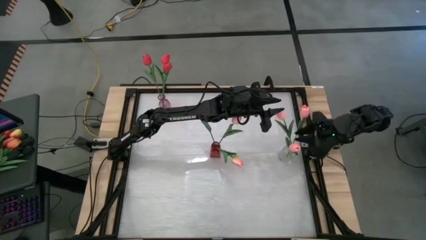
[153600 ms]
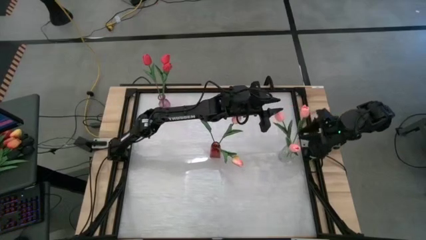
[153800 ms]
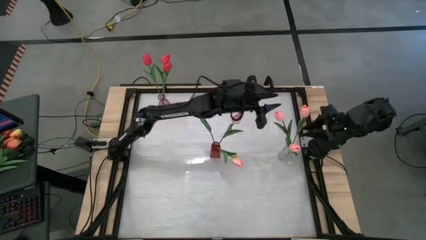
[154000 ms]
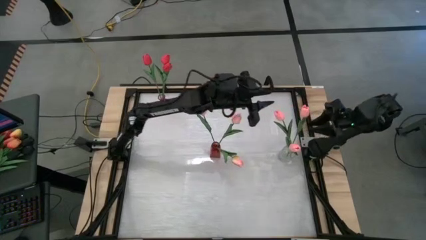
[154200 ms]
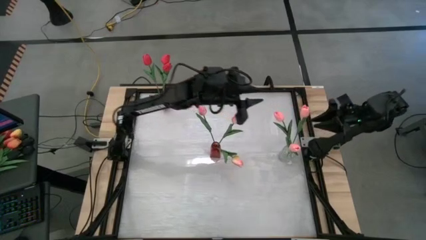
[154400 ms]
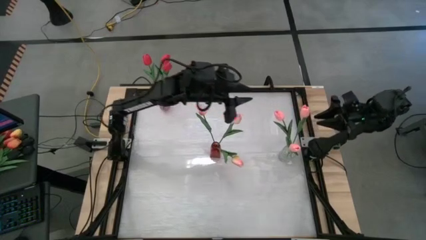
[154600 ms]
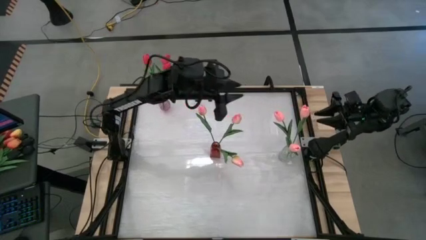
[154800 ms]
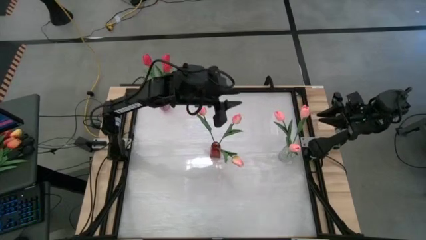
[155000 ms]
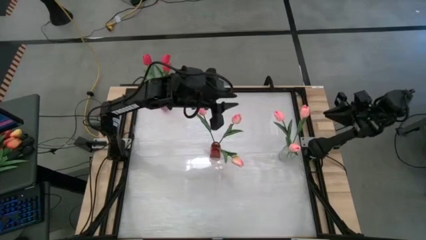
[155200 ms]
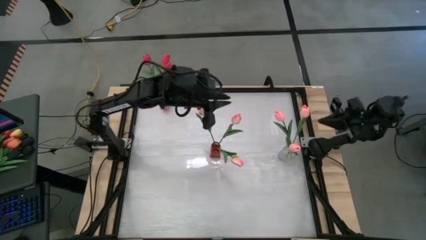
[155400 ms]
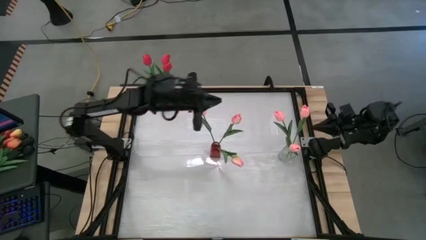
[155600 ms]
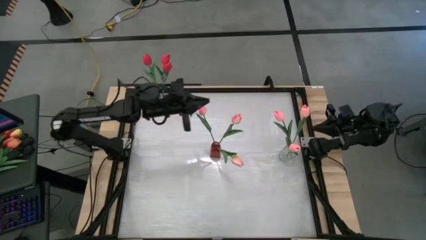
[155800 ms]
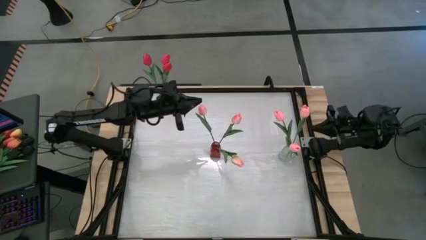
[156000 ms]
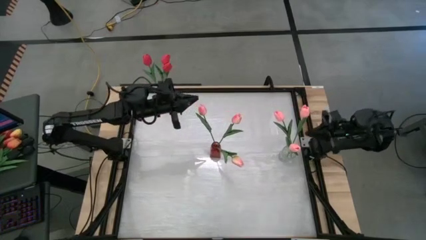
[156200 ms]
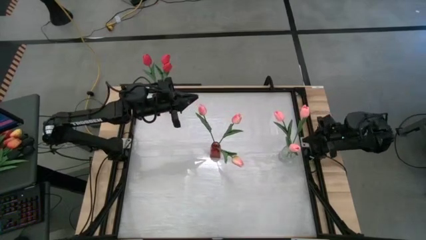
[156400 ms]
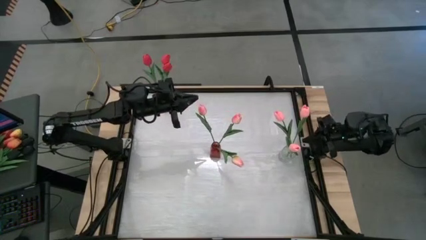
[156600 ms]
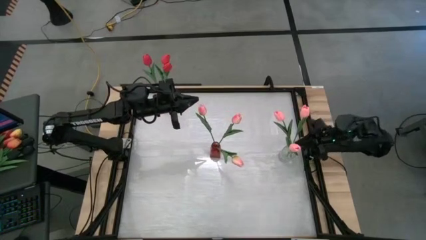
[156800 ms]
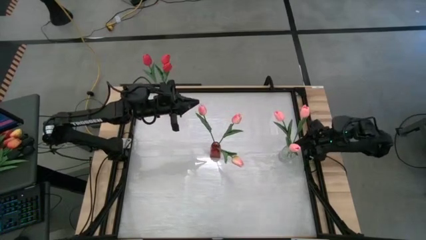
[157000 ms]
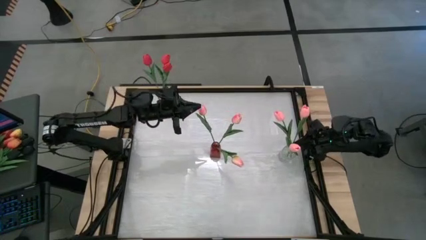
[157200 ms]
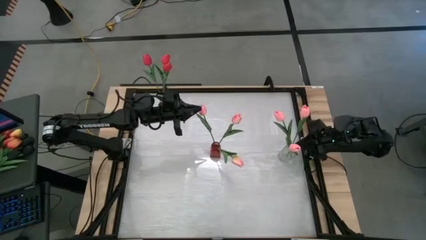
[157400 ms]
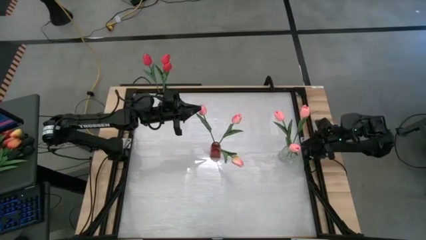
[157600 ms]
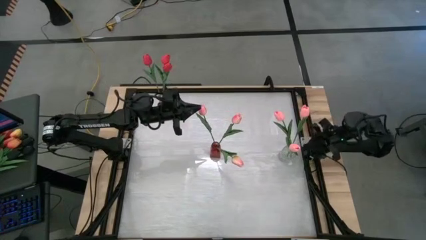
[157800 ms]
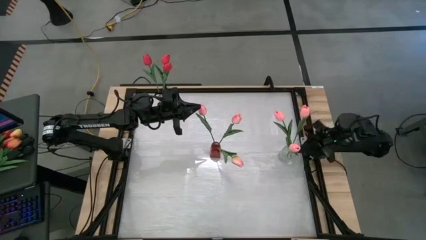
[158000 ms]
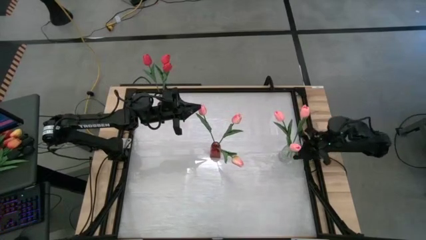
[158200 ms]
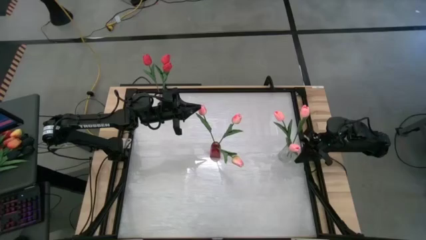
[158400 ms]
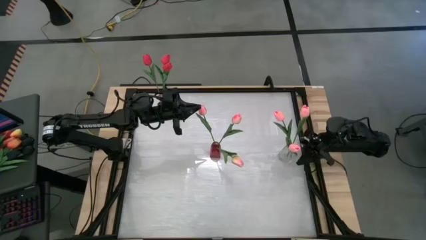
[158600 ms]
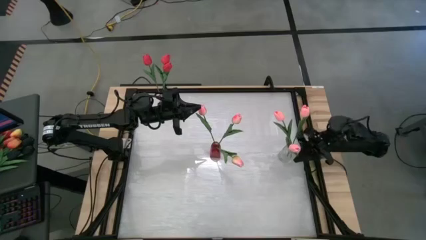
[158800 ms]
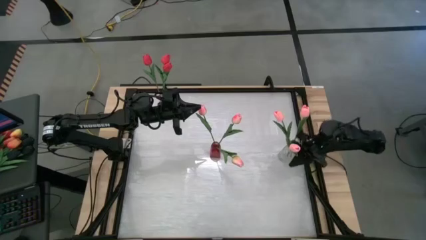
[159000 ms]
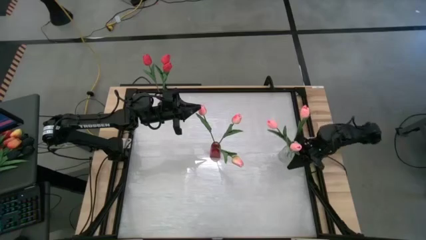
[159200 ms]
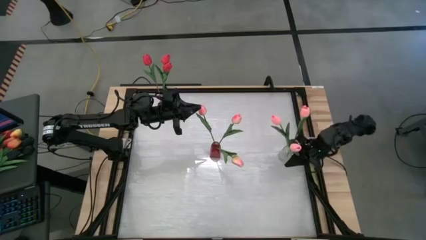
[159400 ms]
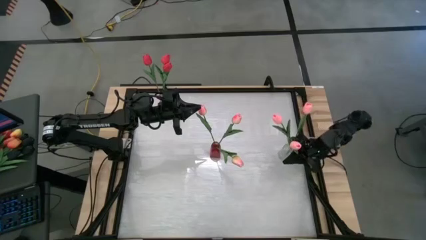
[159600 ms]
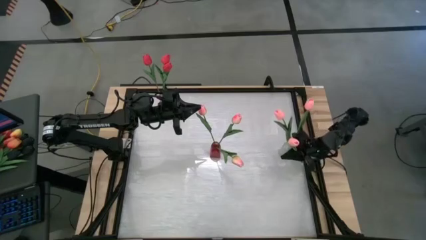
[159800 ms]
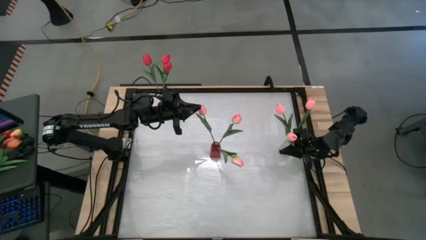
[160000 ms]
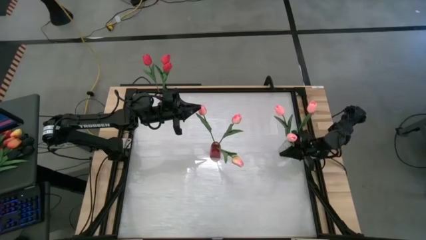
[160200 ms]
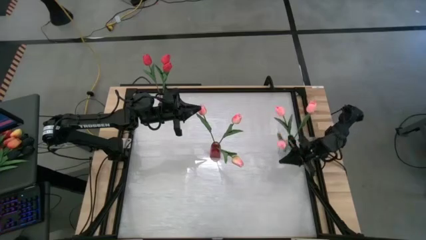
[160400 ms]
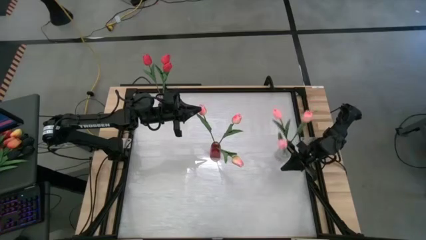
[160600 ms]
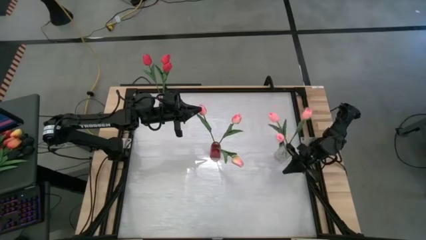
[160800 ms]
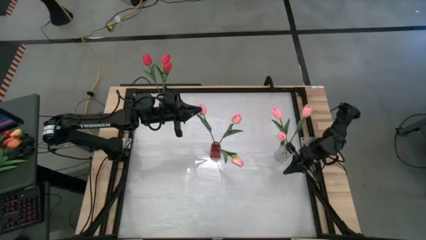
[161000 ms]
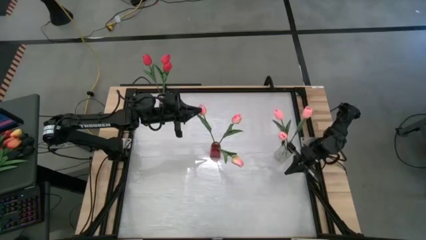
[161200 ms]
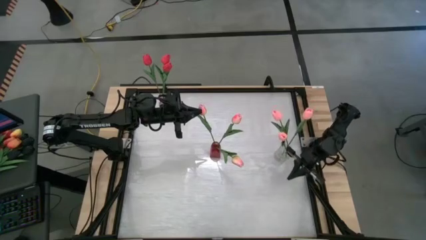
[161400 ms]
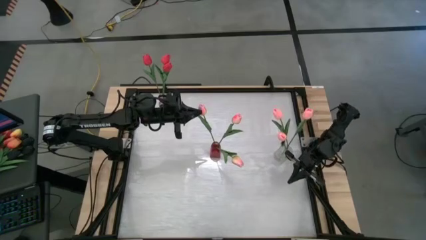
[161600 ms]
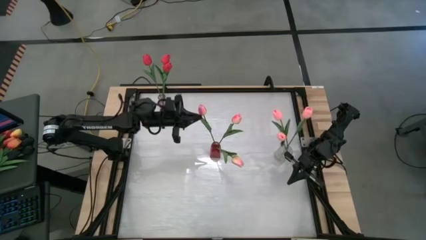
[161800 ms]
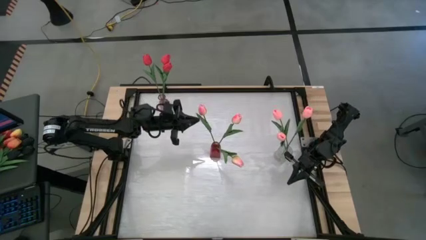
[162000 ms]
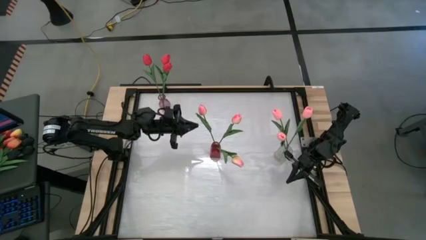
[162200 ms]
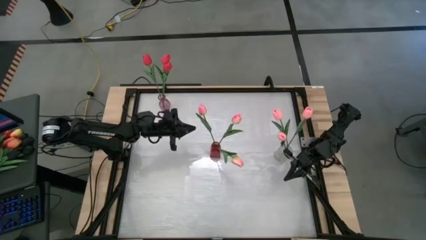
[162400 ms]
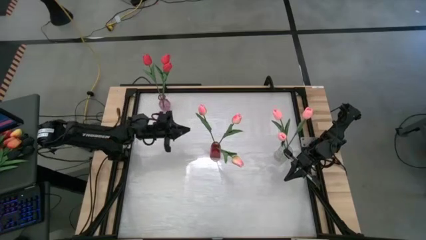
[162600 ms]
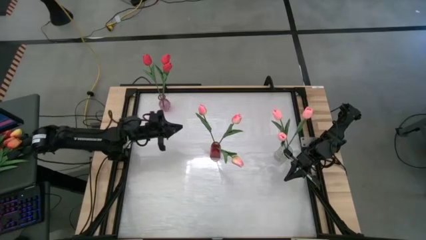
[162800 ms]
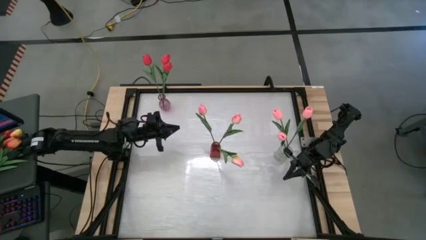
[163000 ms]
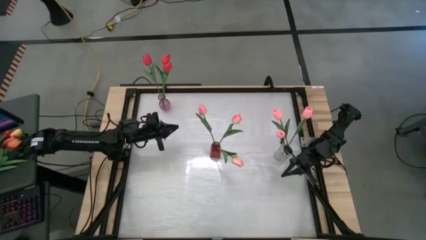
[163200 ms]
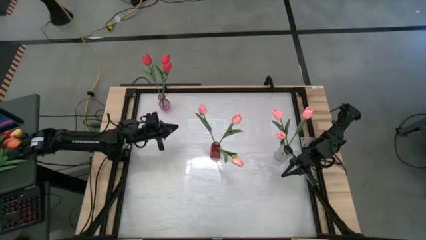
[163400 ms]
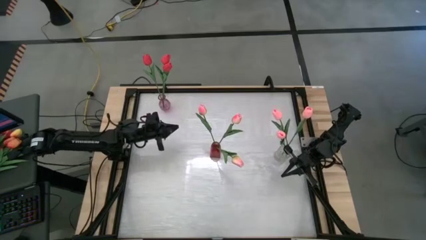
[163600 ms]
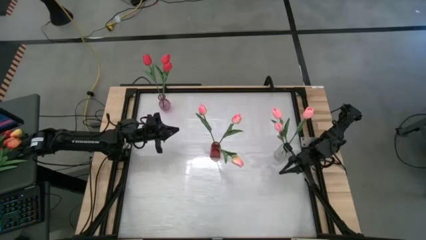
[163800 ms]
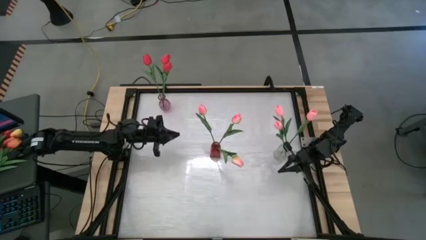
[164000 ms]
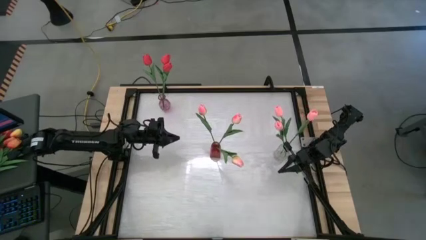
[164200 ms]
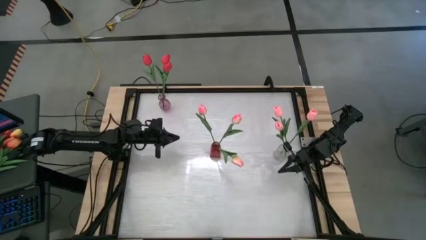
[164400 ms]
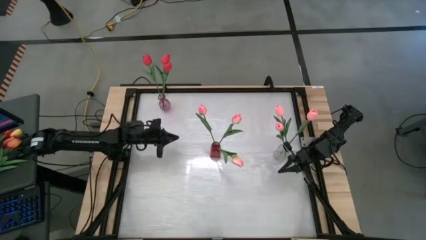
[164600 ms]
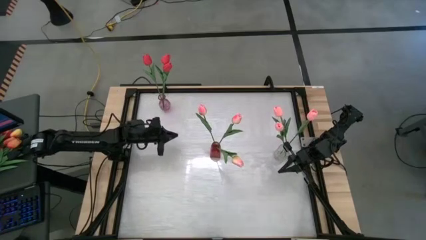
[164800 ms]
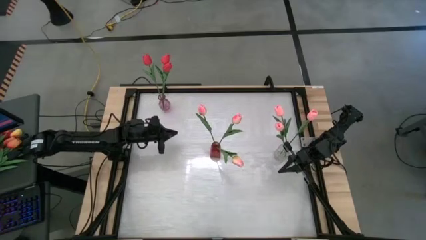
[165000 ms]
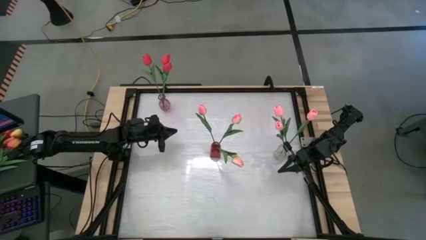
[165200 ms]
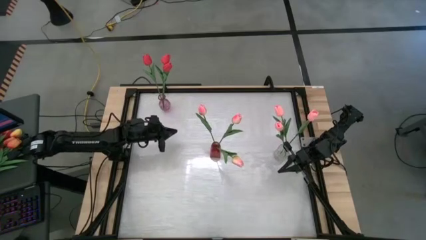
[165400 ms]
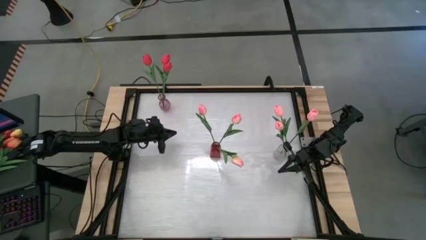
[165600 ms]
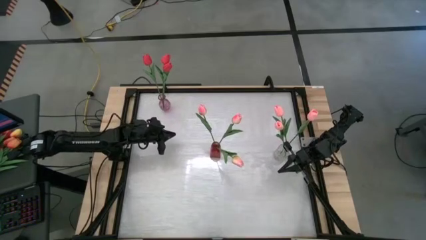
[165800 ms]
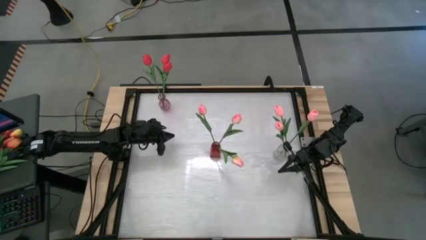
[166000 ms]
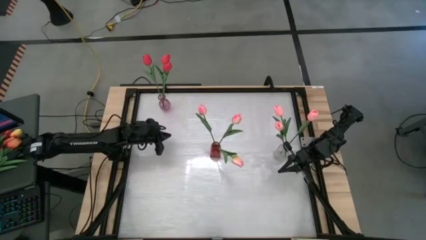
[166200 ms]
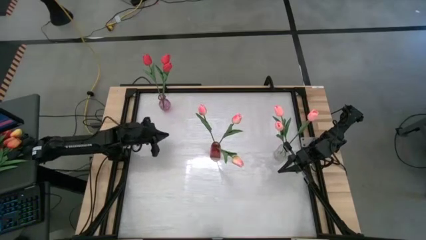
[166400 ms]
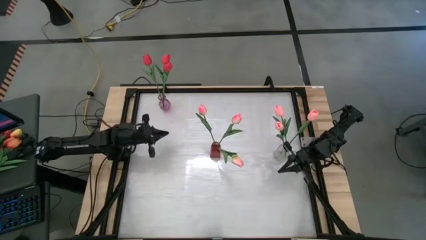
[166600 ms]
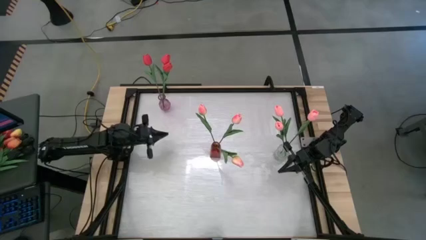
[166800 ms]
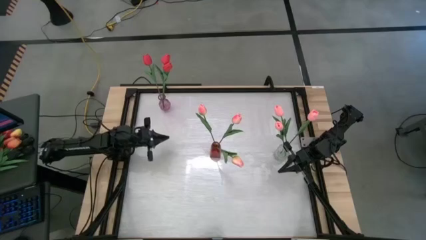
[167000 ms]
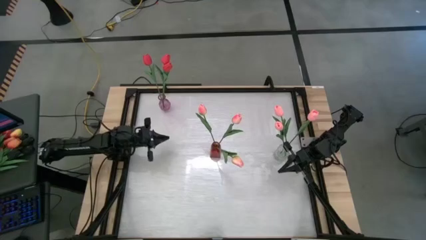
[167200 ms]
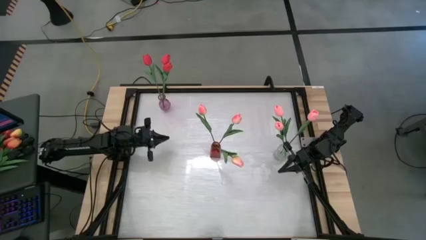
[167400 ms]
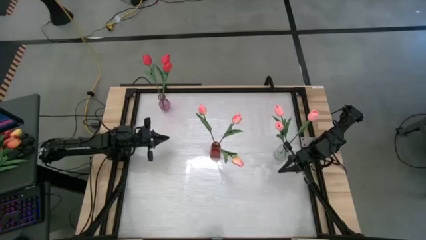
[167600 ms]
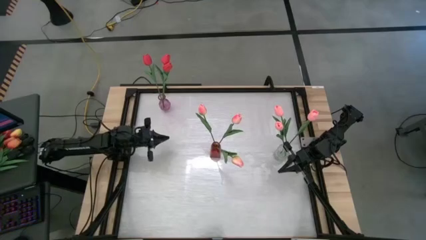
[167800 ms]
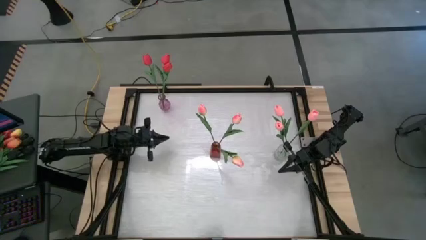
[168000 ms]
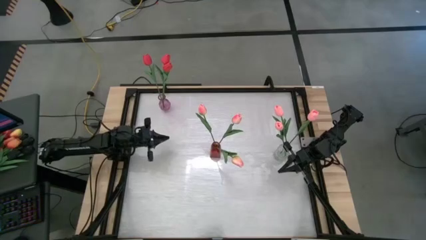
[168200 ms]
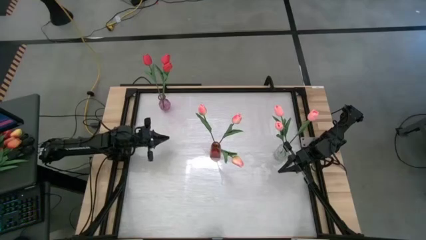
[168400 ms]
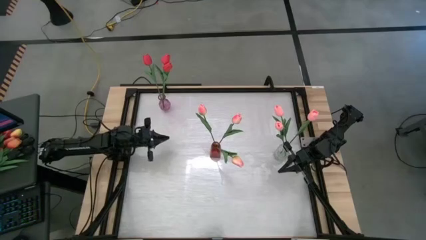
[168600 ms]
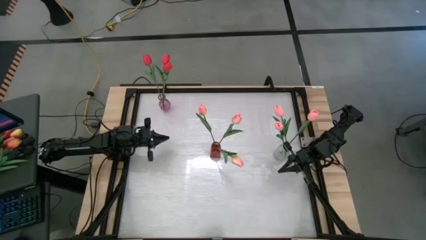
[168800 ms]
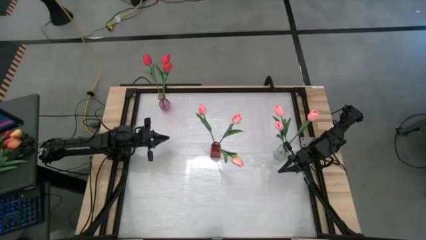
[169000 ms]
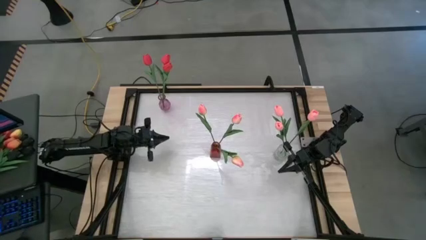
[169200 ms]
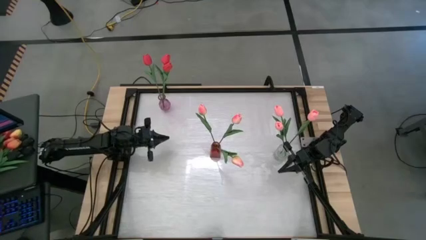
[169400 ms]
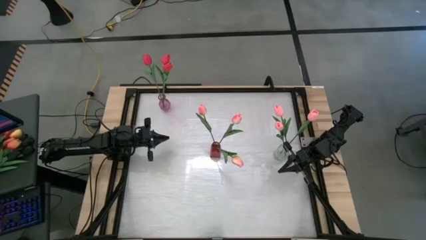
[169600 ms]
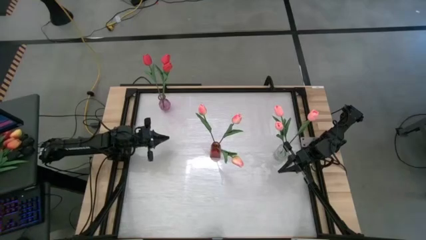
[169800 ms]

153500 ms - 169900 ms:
Task: Sort flowers into vase by color
Return to Home Position

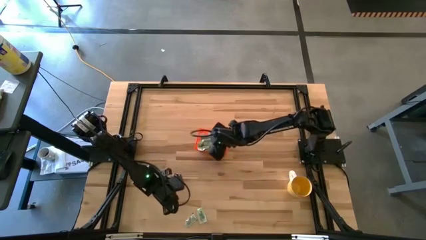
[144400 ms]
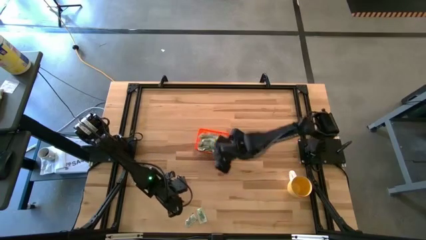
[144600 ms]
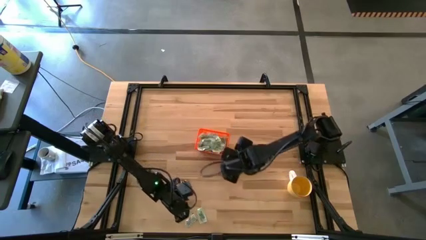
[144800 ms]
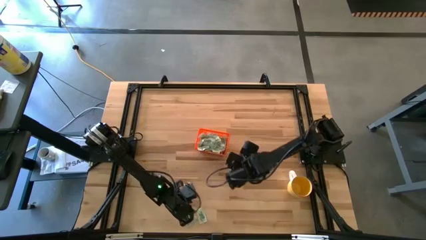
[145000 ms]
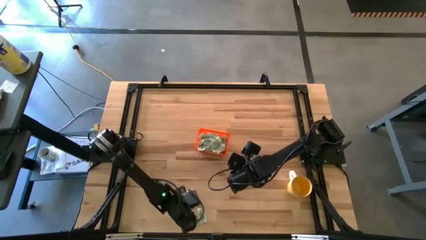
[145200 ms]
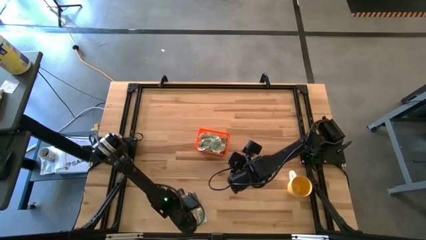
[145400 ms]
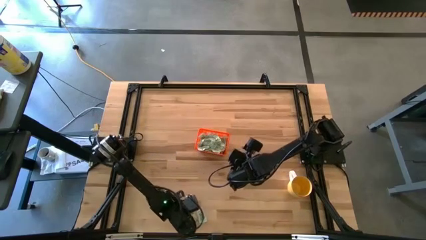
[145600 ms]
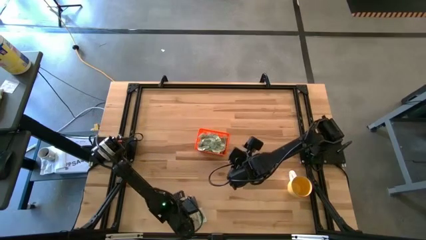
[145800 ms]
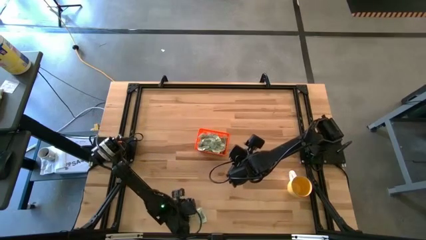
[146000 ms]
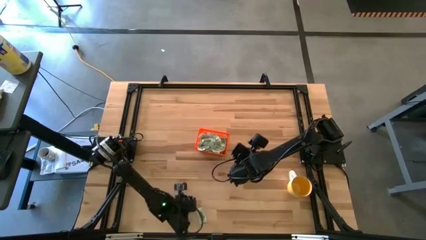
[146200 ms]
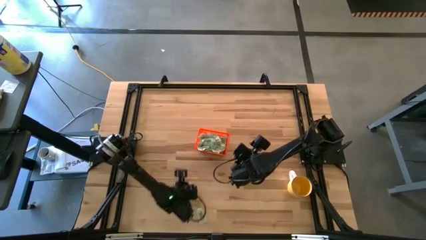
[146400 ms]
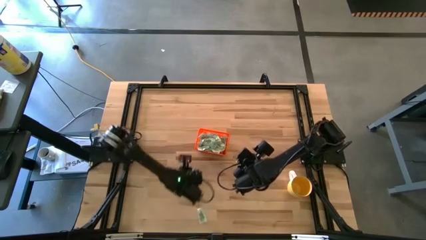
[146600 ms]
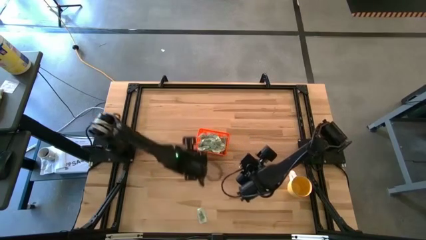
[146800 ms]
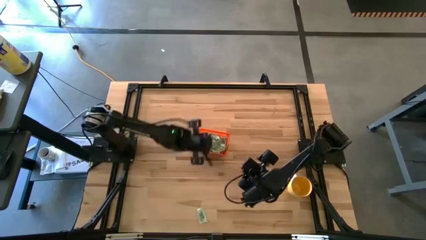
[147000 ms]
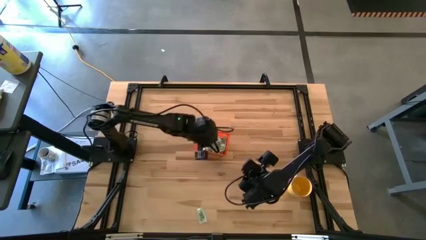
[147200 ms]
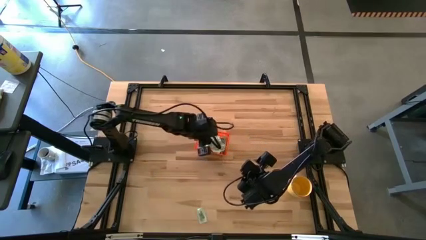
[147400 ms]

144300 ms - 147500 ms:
Task: Pick and place Stevia / Truvia into bins
Put the left light green stevia packet into the orange bin
